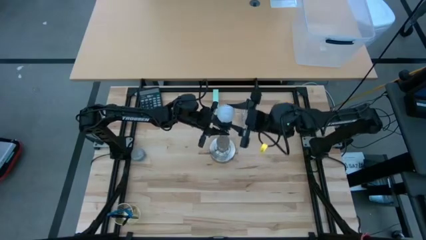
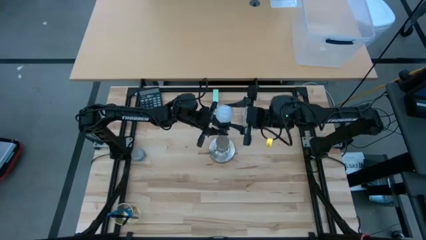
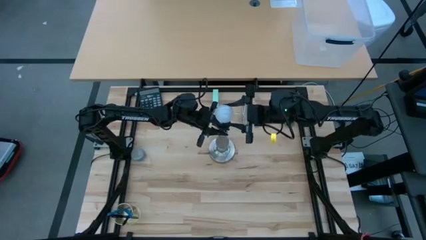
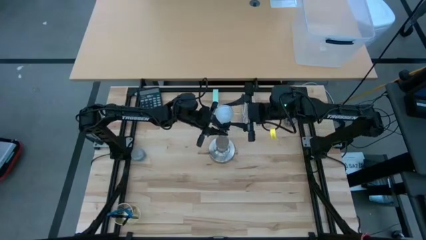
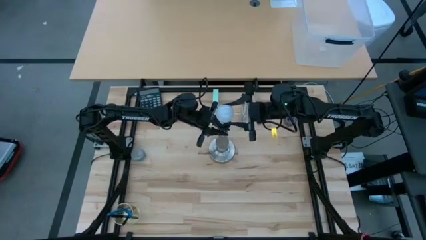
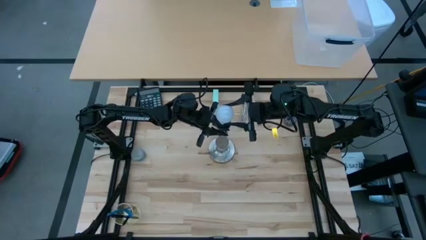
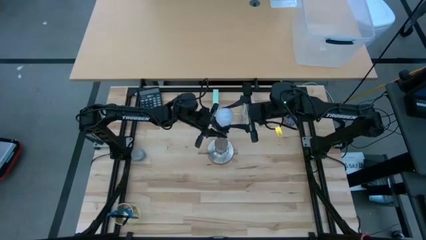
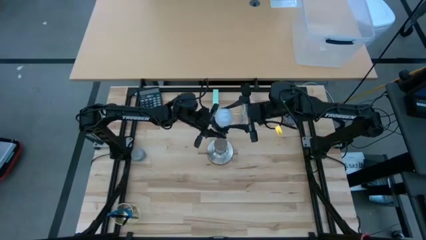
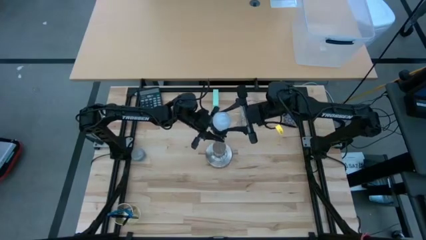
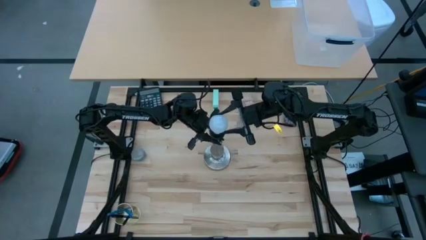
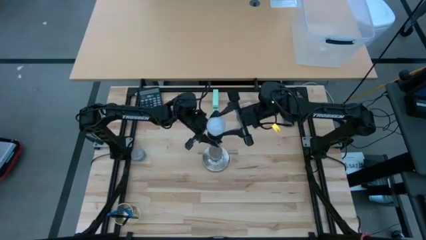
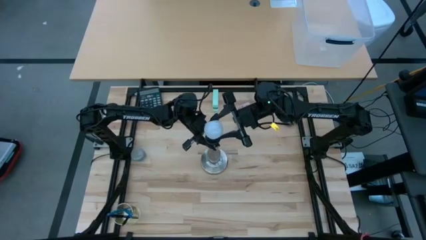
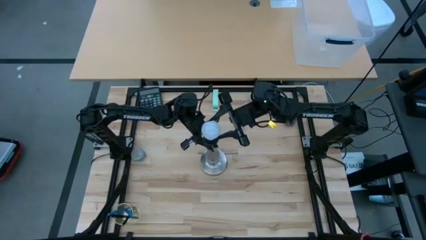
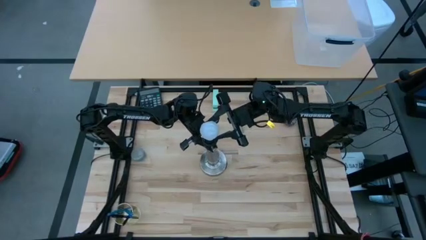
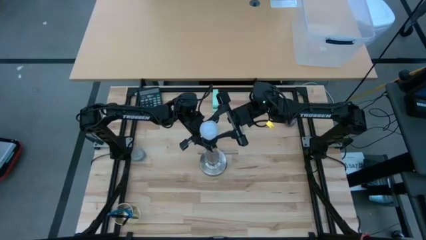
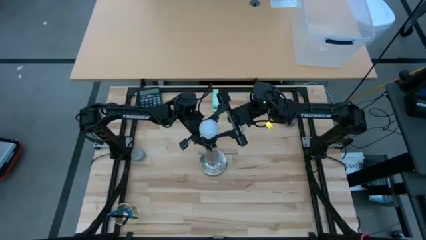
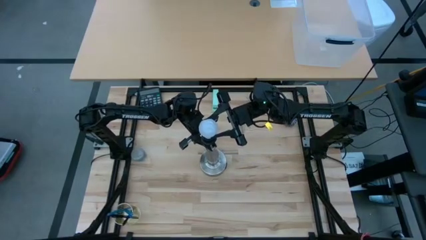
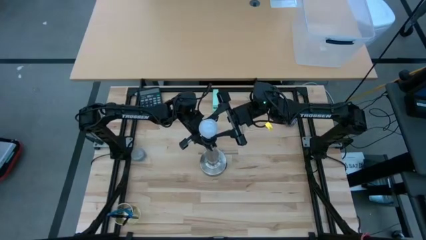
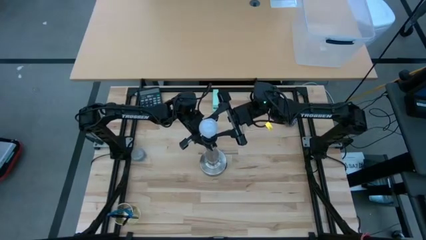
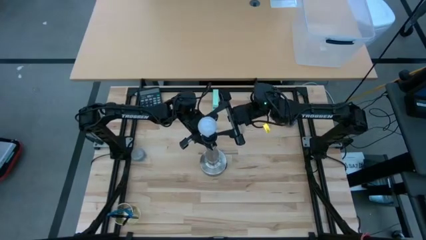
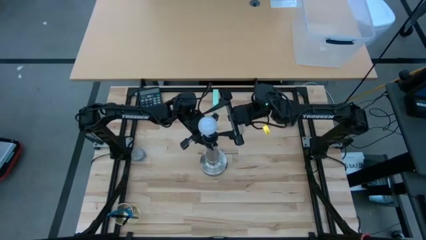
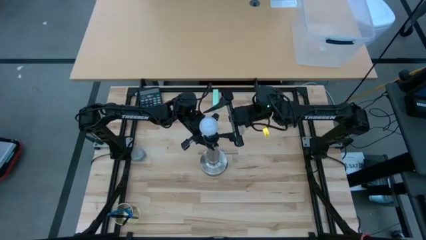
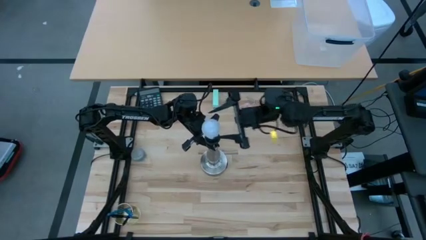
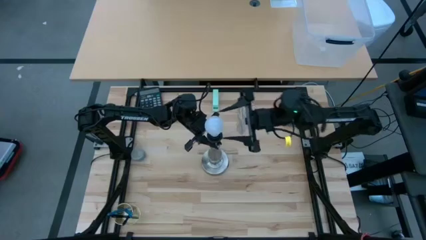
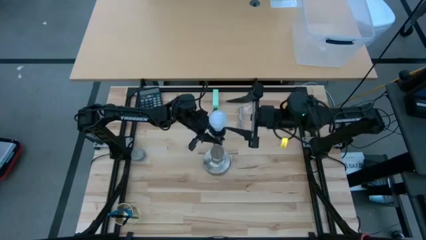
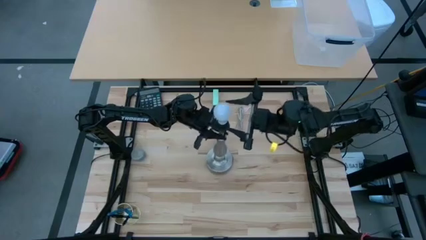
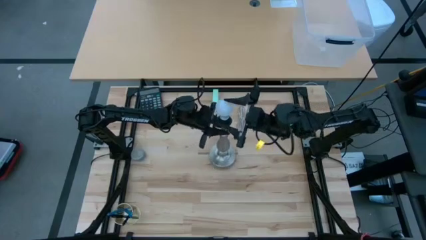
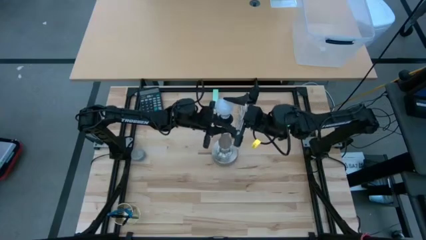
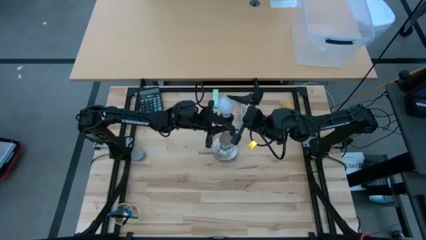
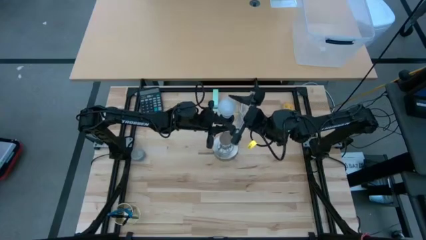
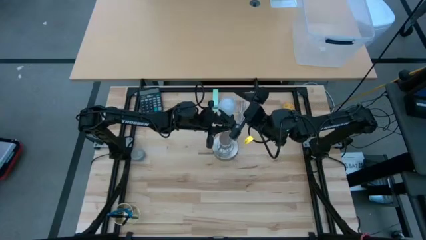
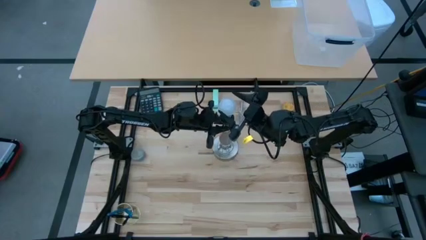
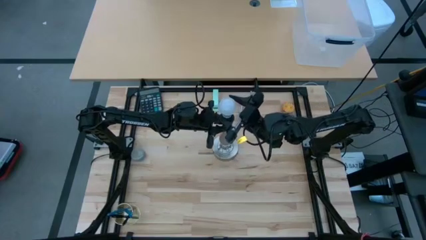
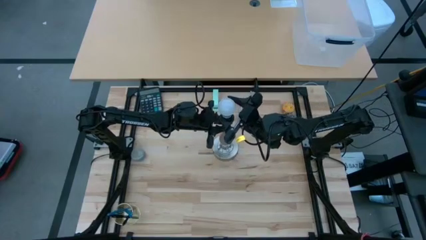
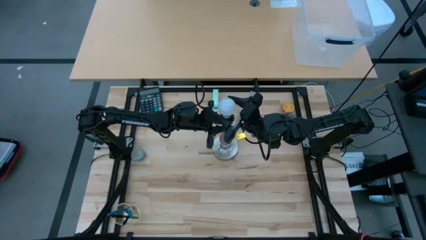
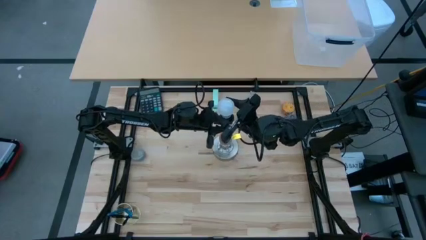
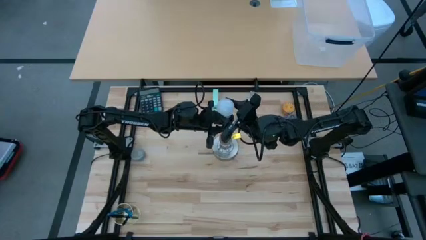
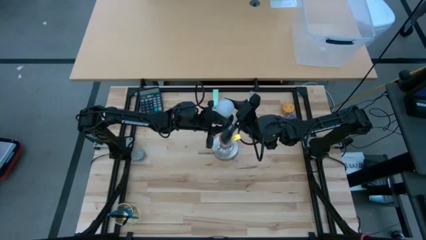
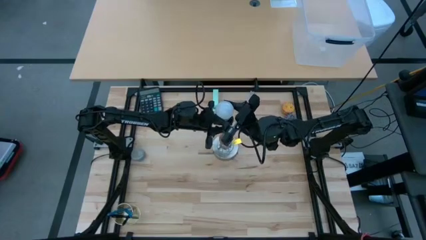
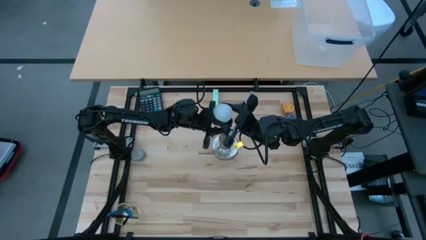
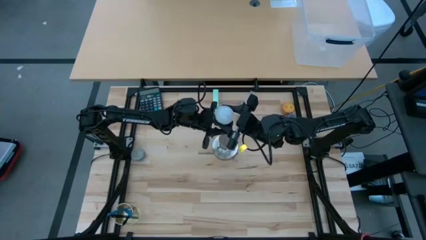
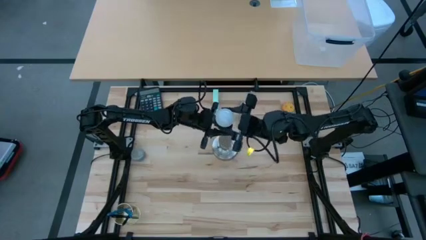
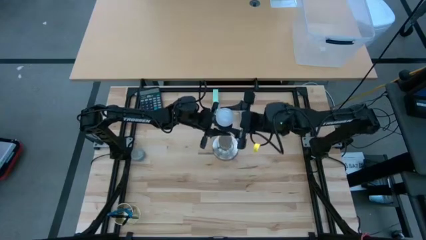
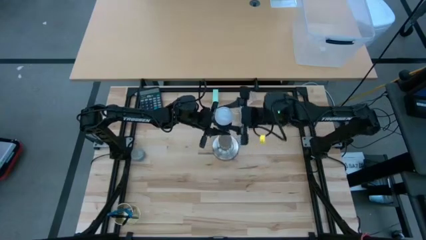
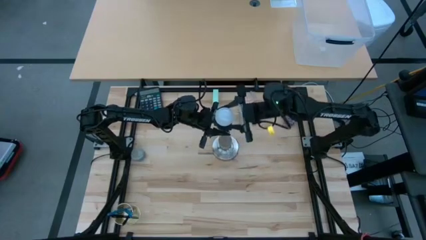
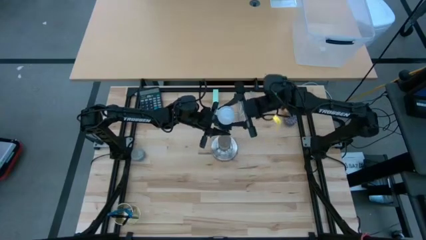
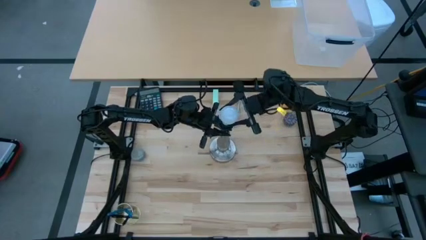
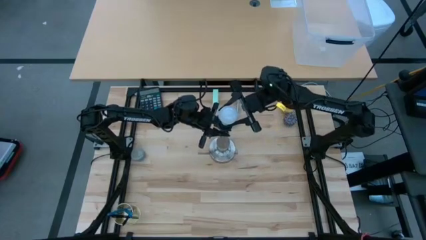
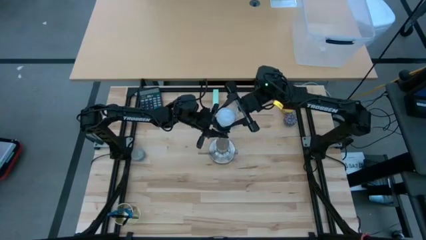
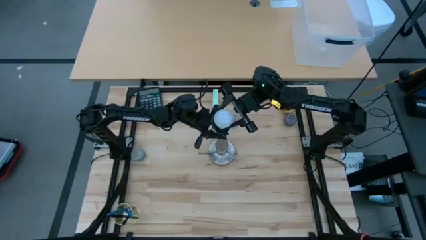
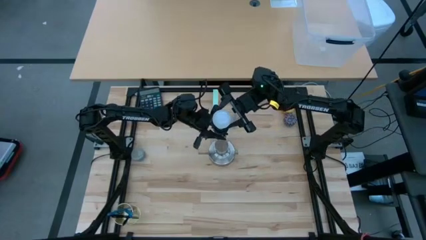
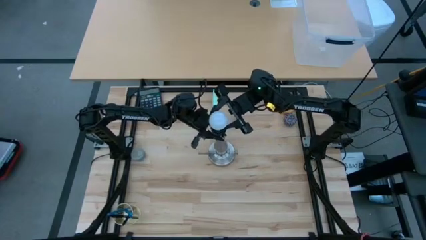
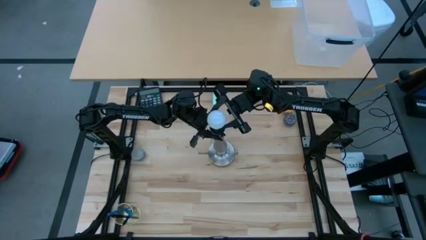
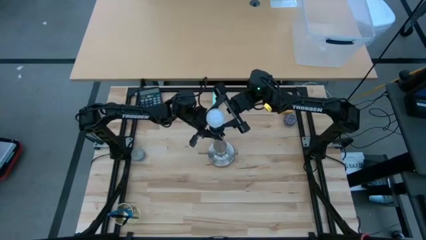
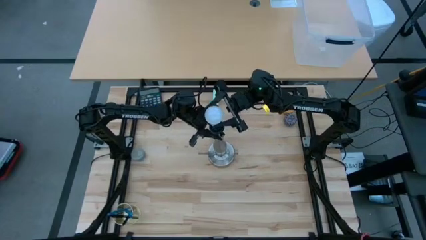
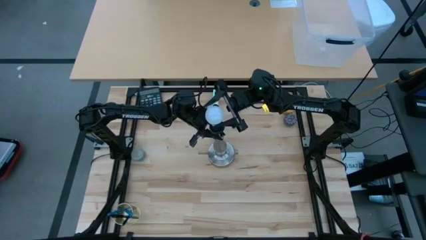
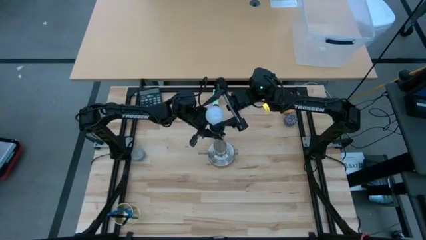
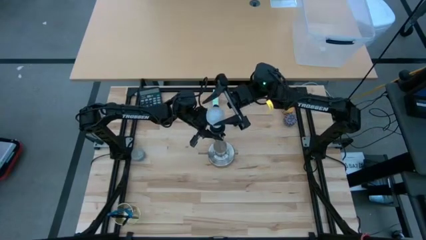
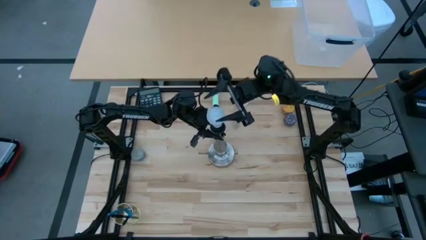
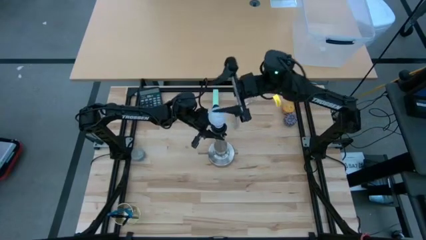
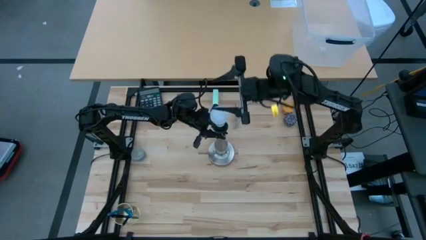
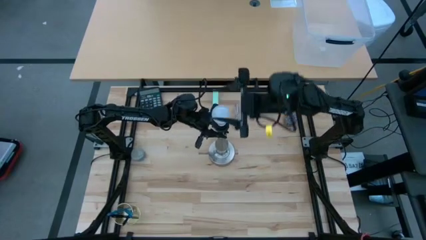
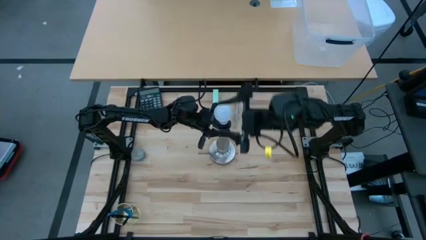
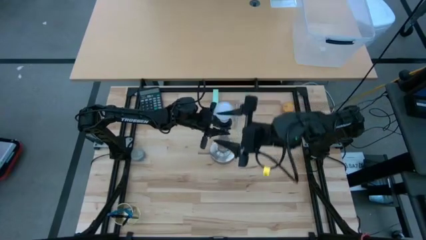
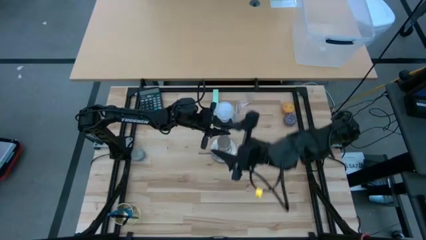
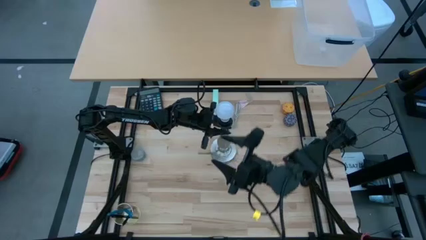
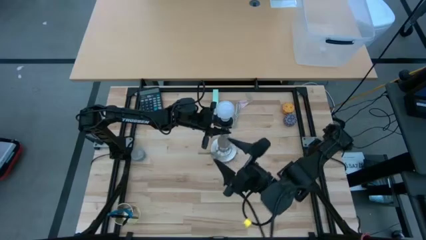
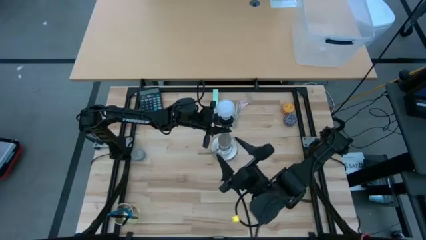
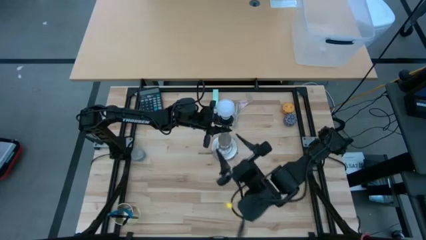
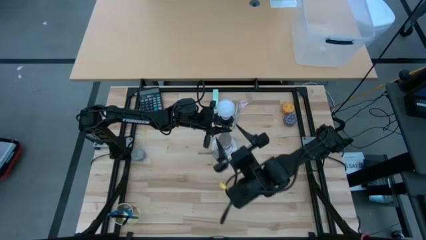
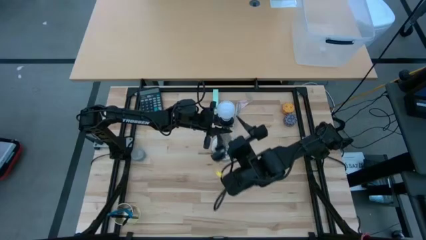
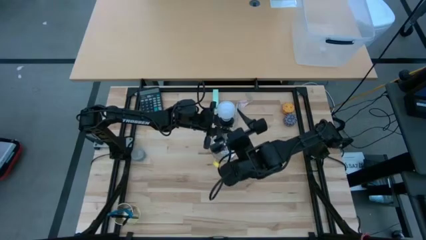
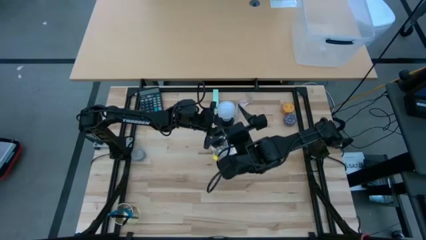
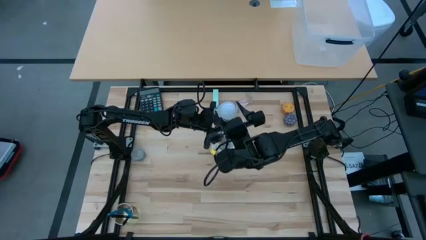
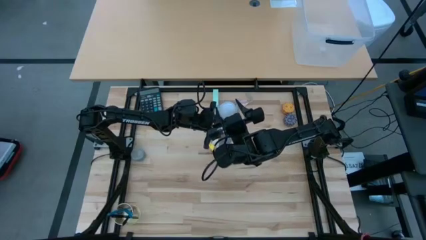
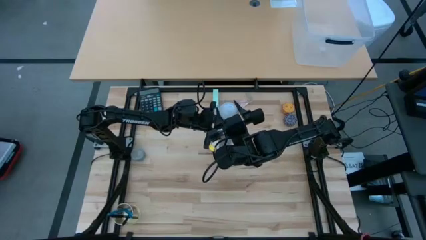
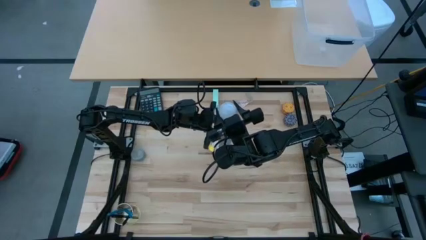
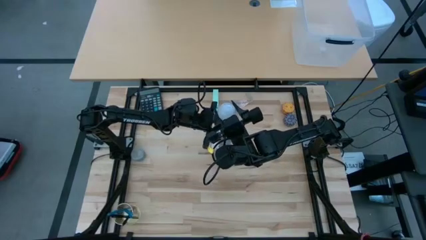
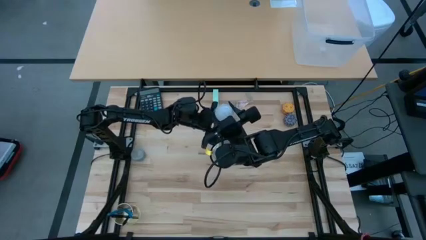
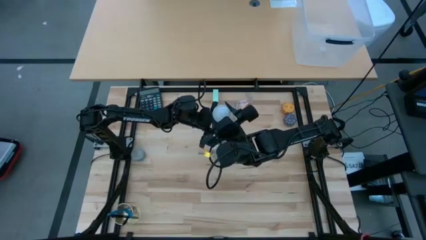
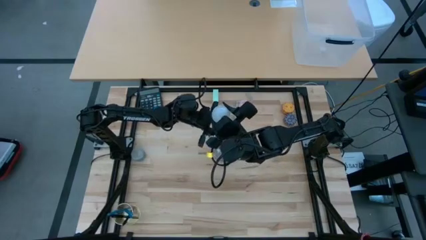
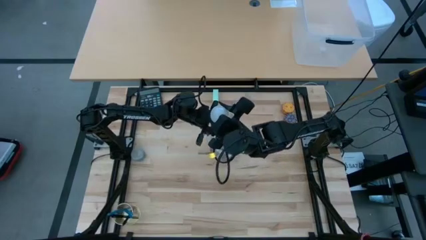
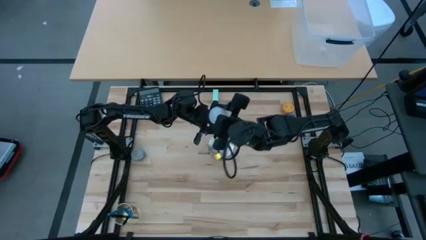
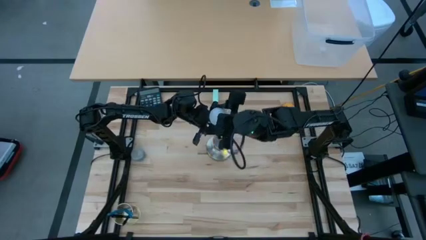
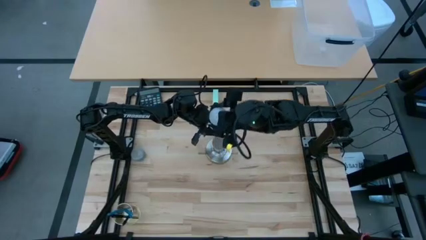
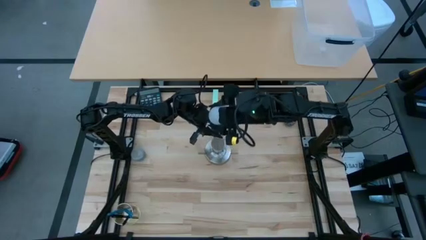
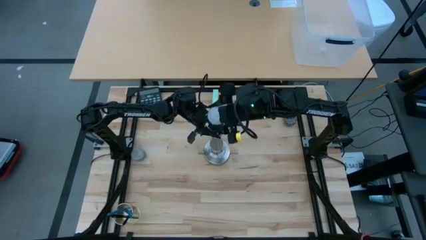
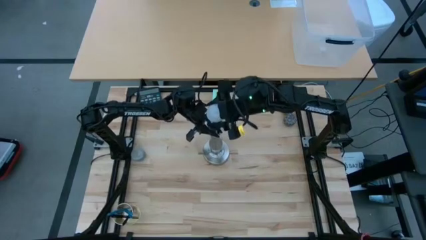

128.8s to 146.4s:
Task: Screw lightbulb
Remove the white lightbulb from the desk lamp
